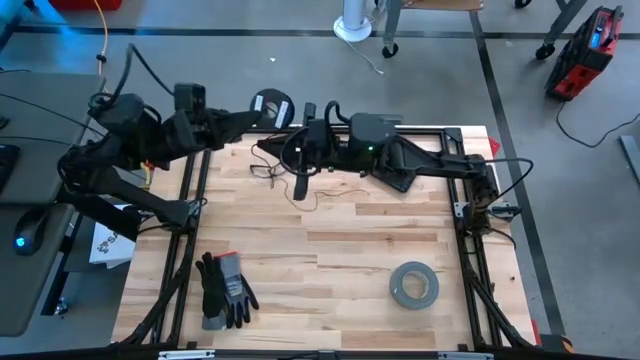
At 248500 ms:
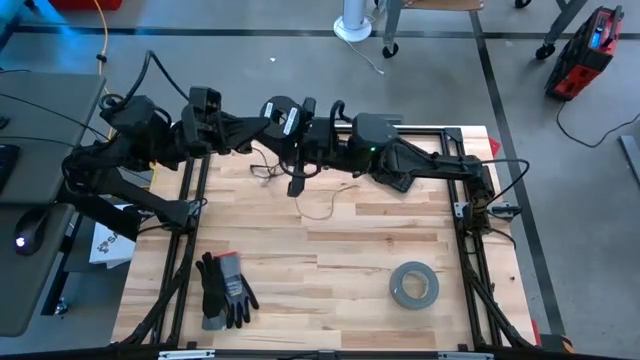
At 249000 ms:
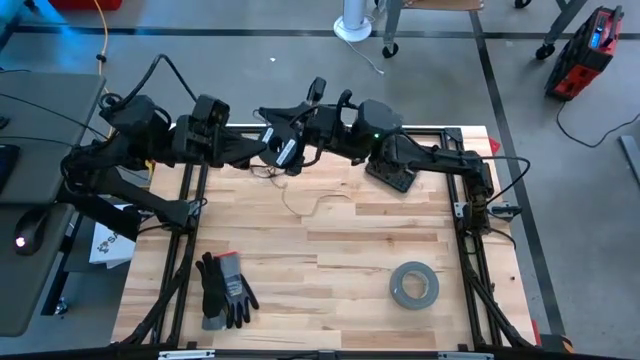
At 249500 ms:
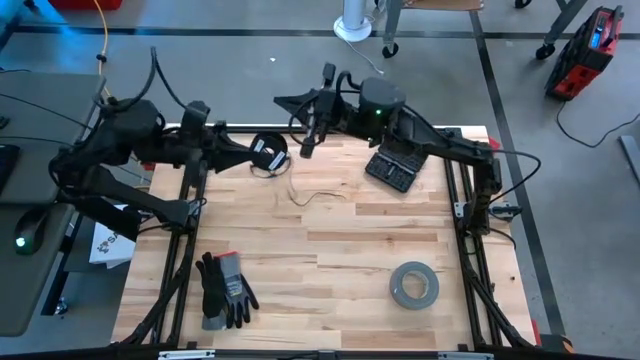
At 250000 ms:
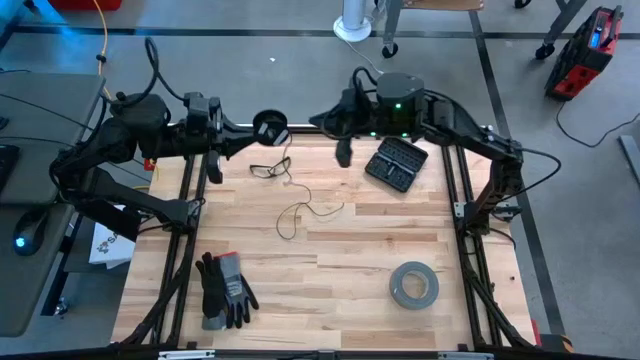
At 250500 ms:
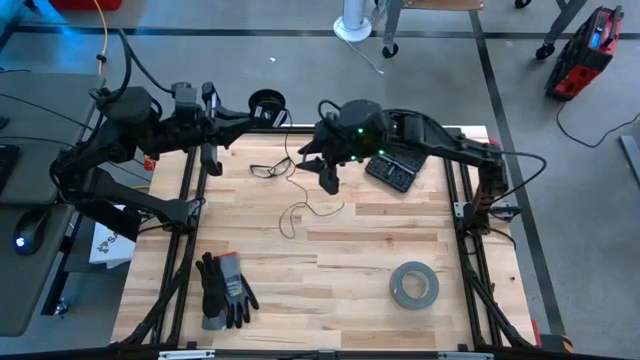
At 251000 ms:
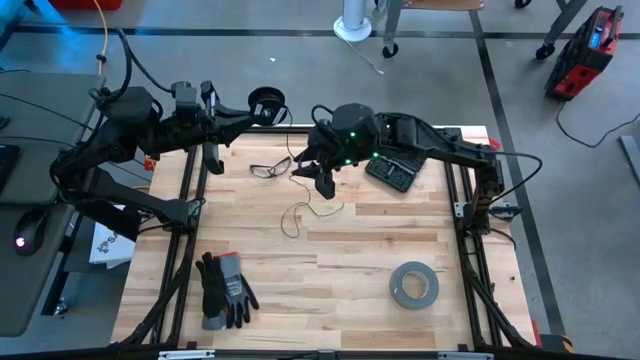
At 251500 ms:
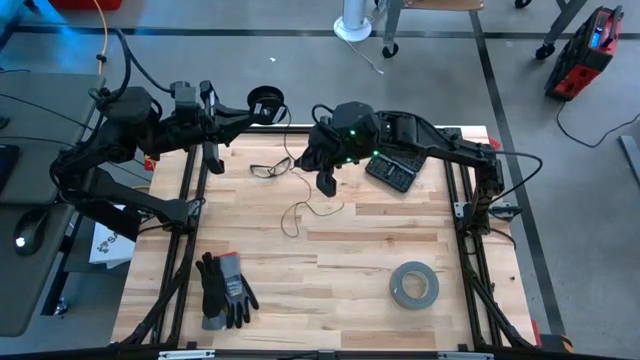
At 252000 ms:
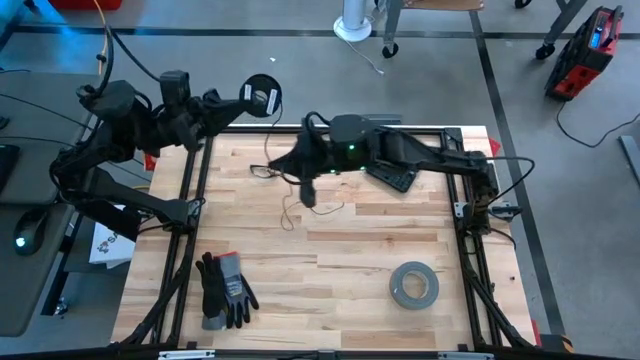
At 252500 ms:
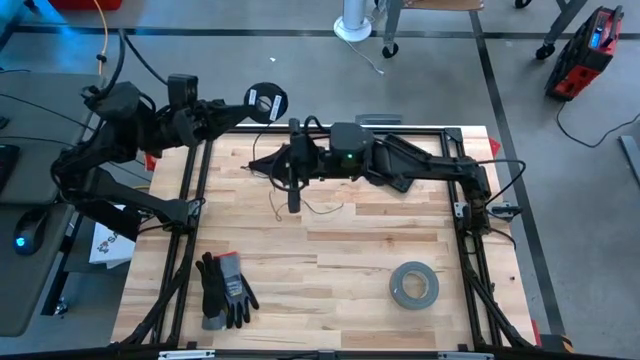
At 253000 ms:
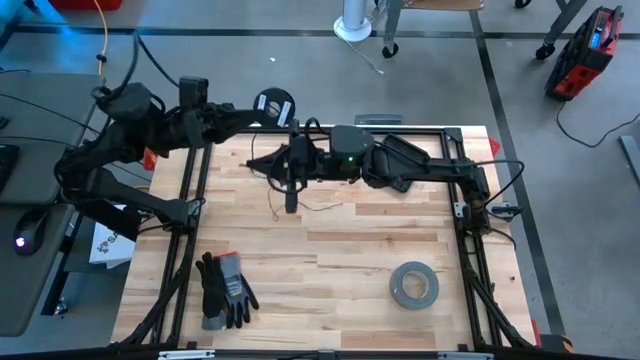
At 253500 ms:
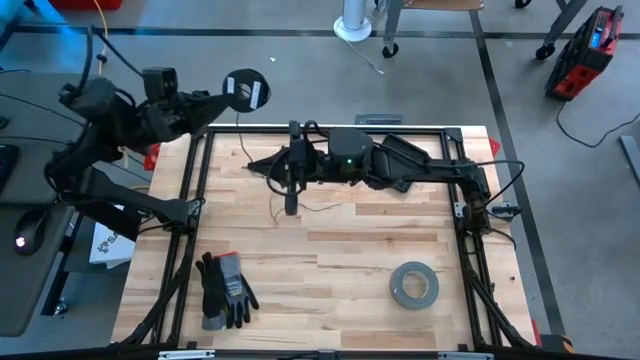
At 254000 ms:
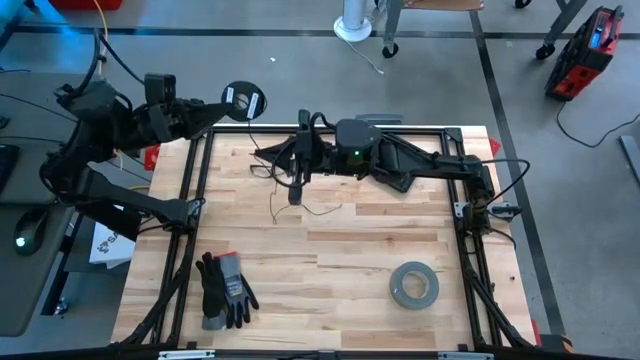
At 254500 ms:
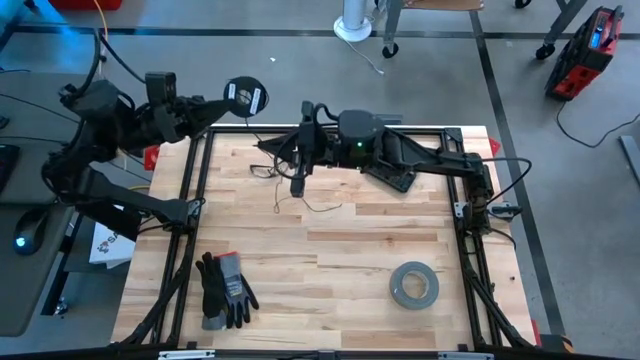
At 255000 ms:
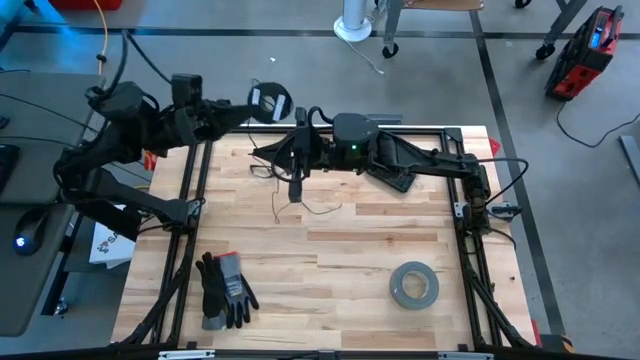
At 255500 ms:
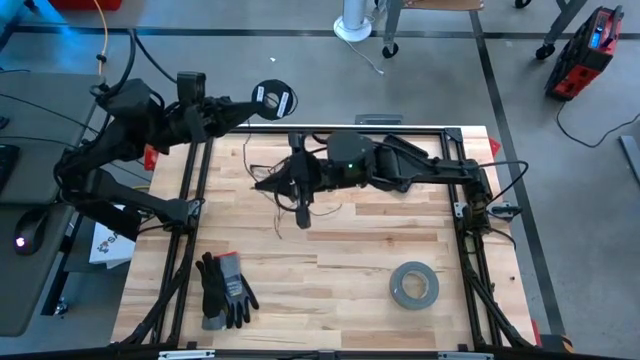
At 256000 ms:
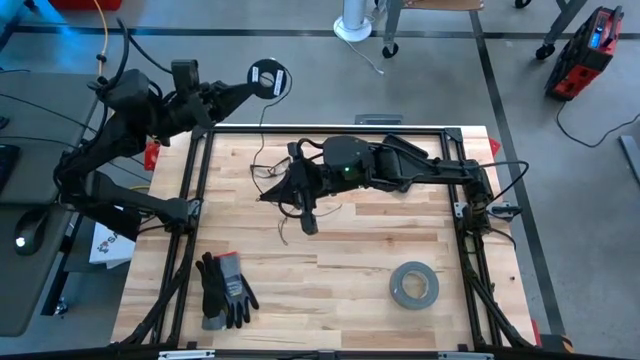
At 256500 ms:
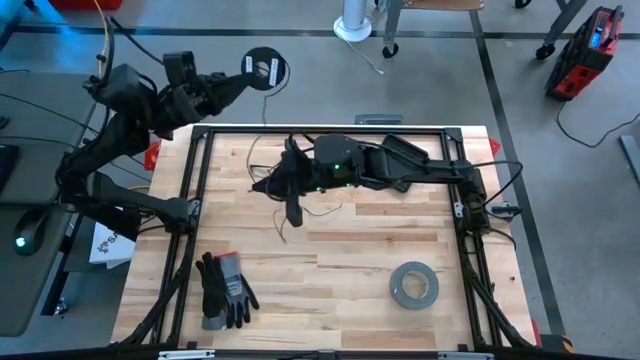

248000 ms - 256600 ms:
Task: Coil cords
Coil the black wire on the black spool
